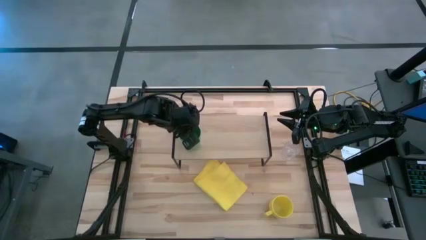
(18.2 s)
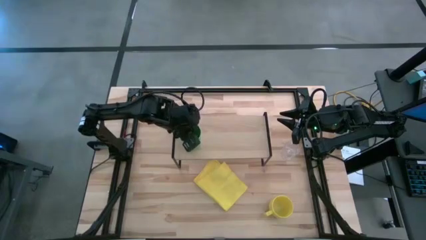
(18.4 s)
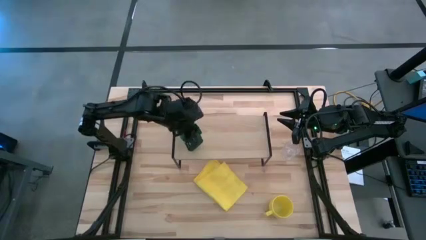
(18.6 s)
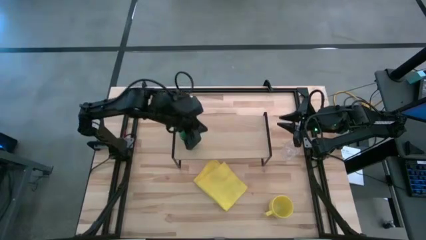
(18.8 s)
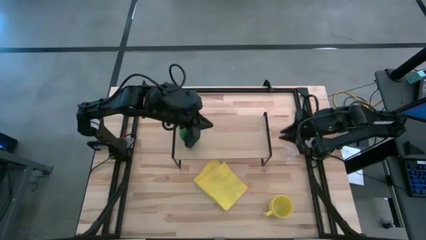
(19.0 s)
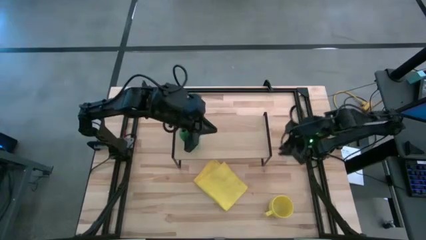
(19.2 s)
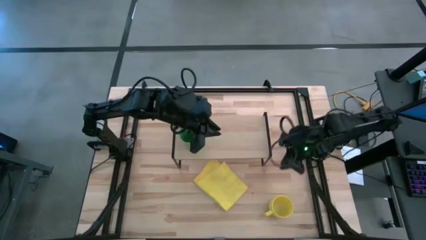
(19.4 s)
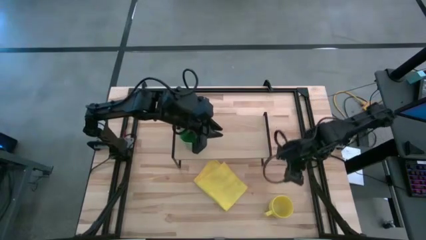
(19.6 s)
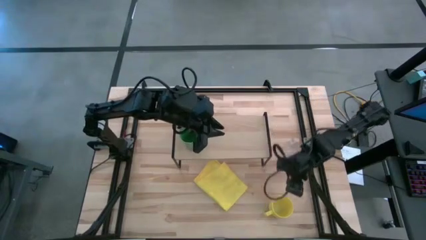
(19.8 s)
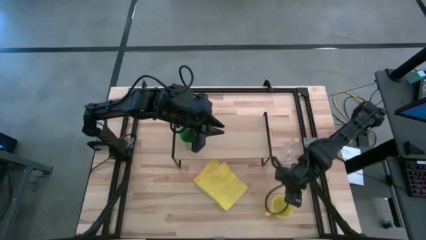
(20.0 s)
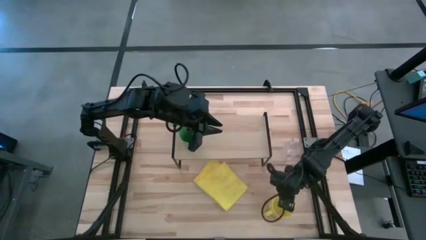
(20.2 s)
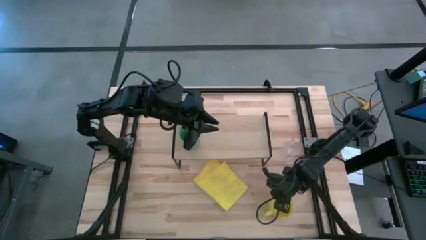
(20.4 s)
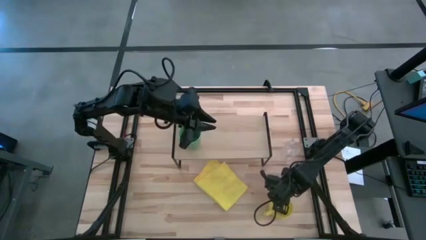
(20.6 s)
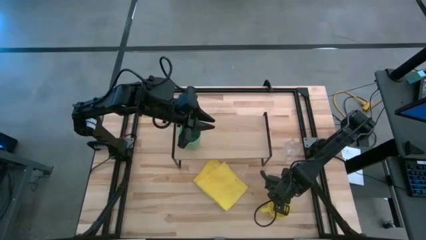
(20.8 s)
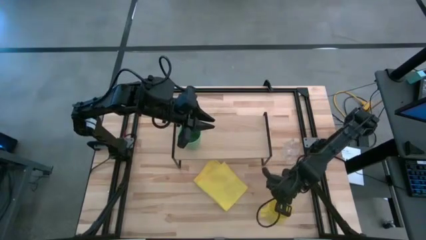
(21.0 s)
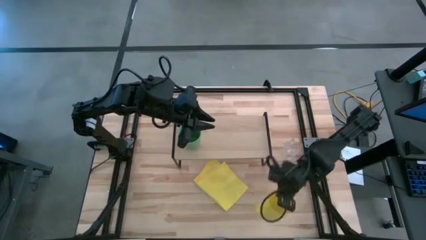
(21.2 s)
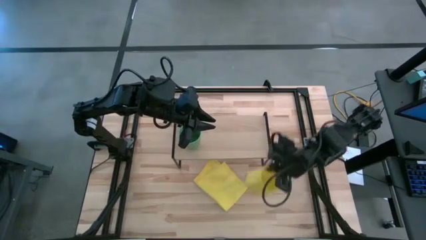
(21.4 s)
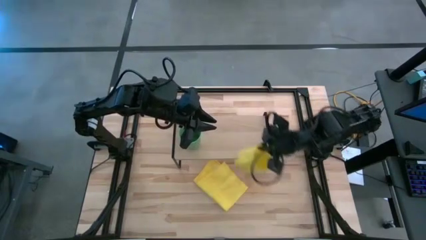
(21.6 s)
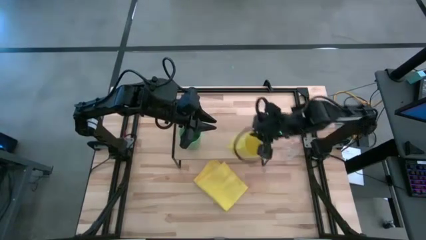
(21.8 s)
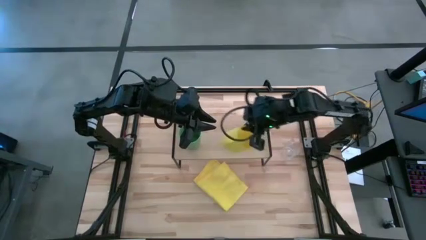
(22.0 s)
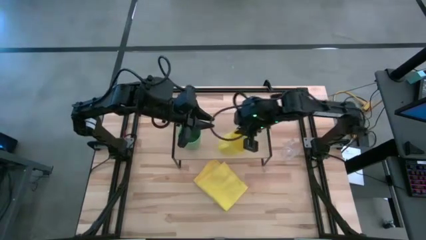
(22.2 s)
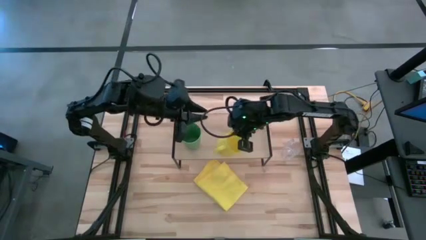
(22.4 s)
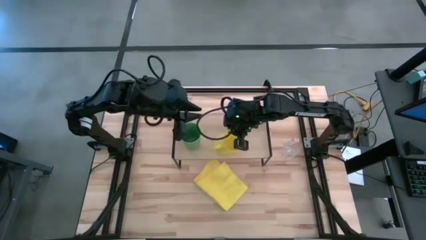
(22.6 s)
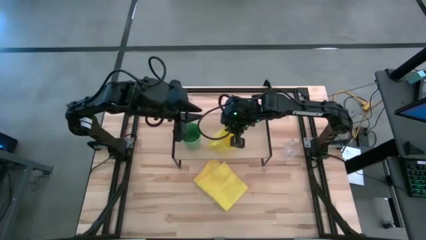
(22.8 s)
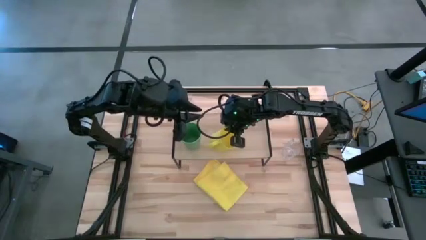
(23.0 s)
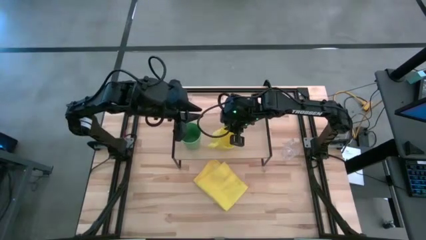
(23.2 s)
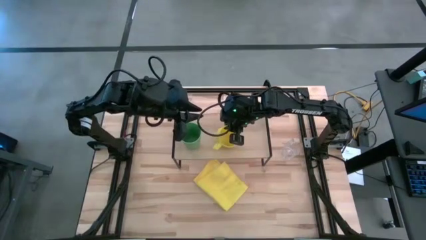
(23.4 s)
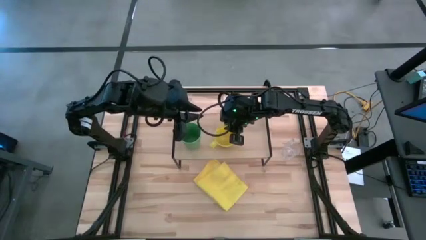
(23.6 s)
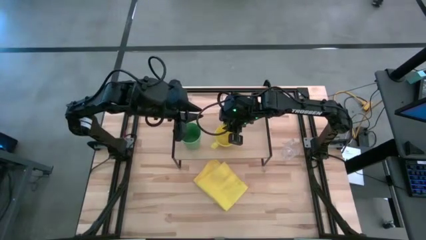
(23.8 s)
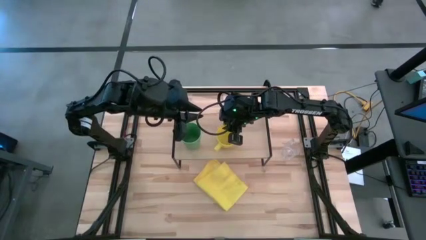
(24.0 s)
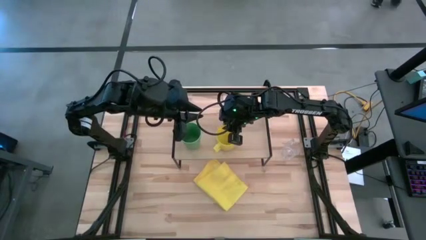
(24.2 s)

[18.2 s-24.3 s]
Task: Stack small to large cups/mugs on shelf
Put the yellow mug on the shelf

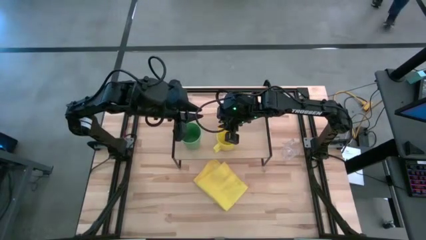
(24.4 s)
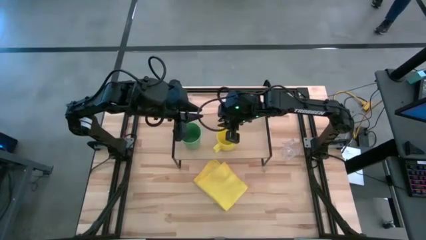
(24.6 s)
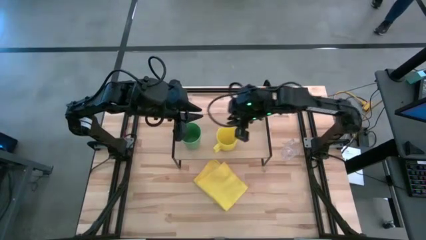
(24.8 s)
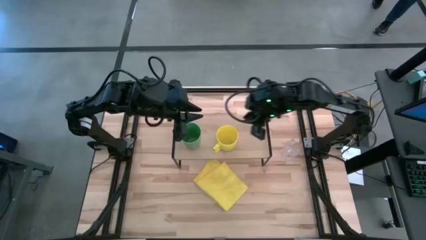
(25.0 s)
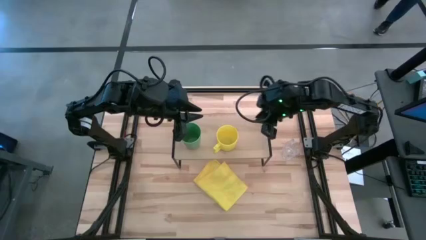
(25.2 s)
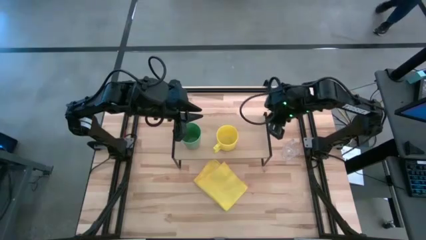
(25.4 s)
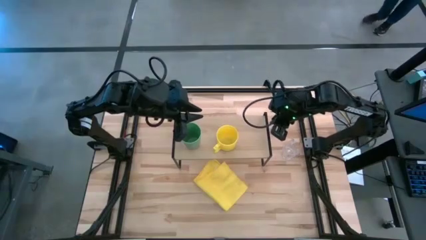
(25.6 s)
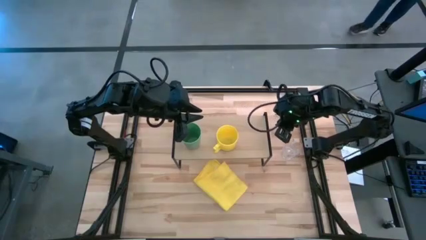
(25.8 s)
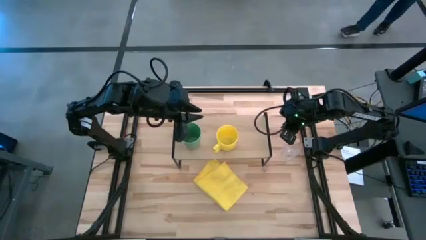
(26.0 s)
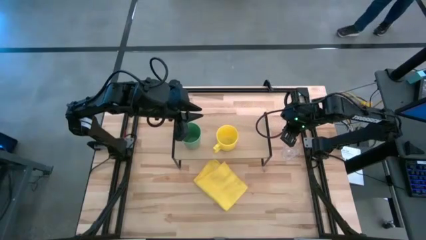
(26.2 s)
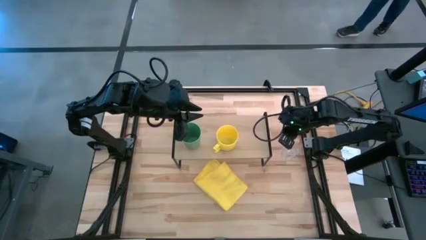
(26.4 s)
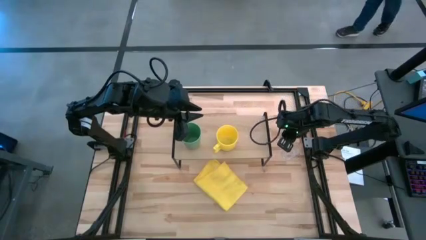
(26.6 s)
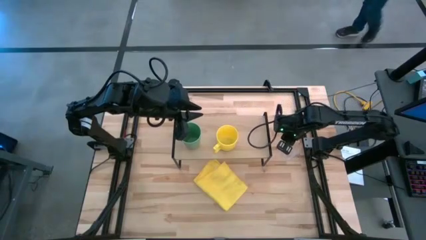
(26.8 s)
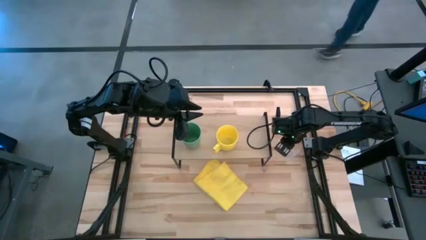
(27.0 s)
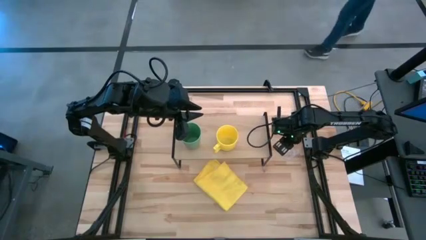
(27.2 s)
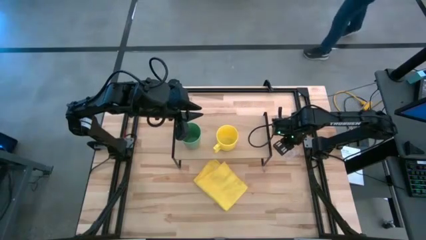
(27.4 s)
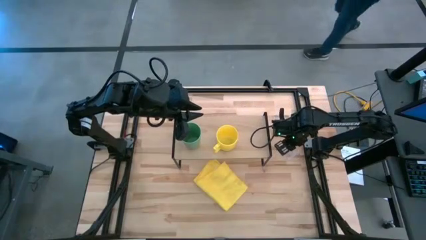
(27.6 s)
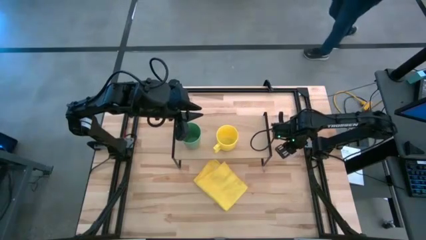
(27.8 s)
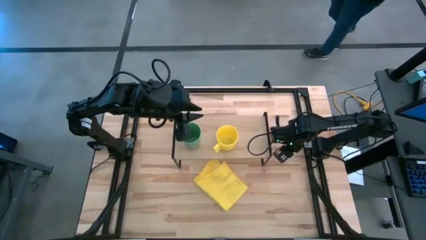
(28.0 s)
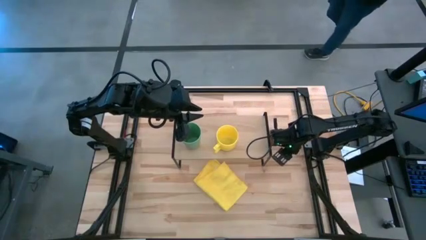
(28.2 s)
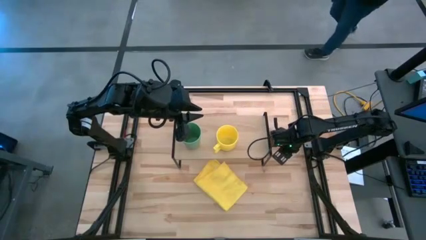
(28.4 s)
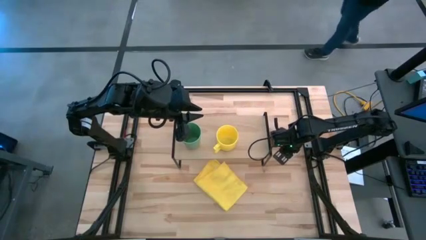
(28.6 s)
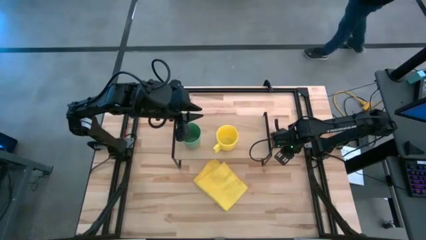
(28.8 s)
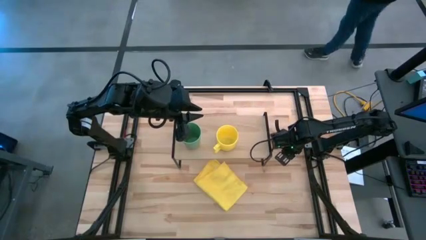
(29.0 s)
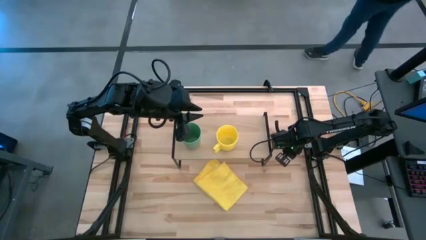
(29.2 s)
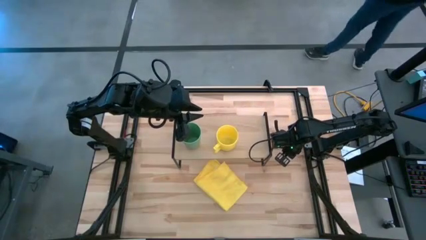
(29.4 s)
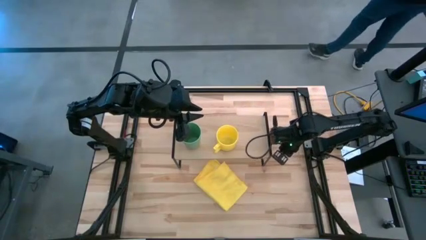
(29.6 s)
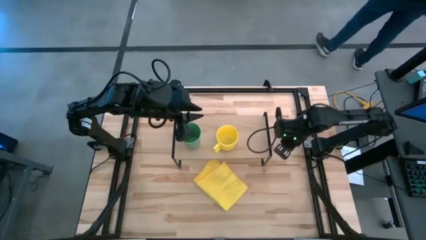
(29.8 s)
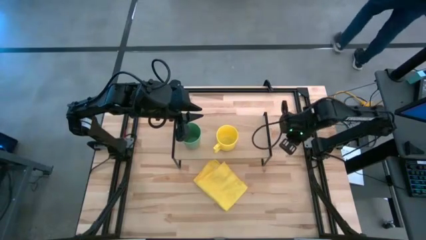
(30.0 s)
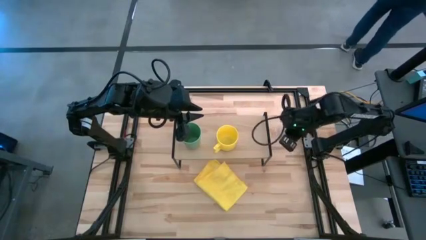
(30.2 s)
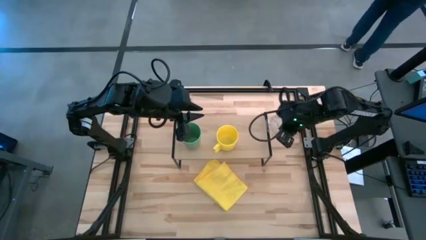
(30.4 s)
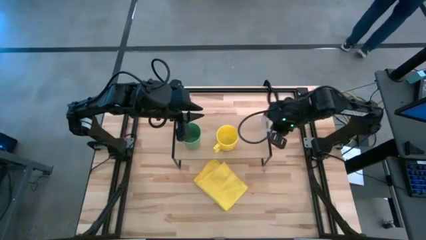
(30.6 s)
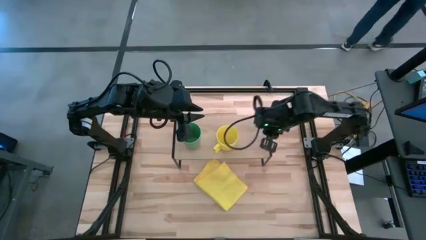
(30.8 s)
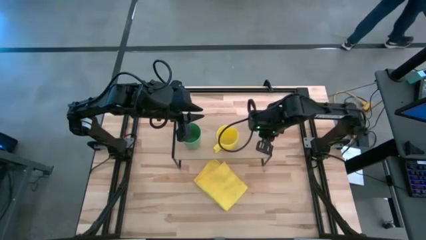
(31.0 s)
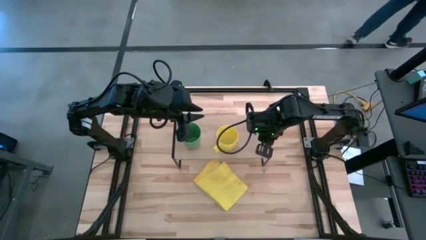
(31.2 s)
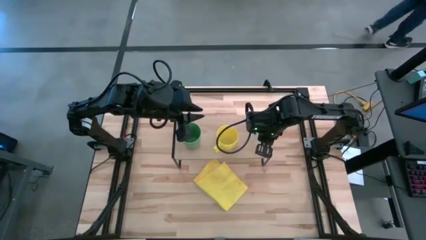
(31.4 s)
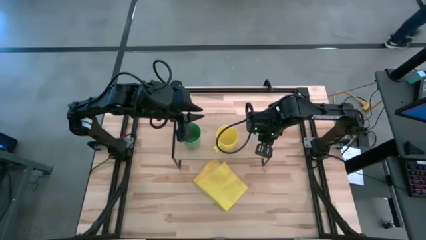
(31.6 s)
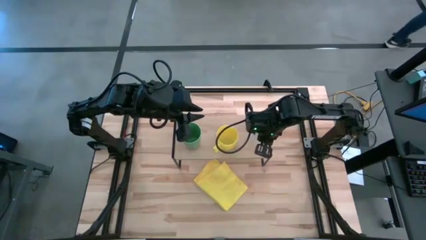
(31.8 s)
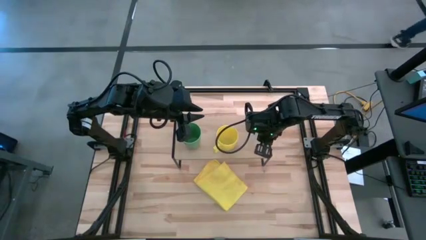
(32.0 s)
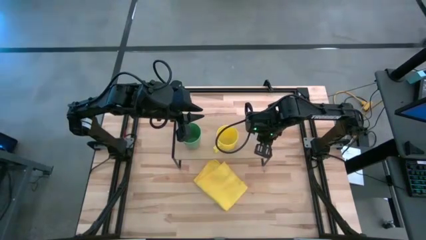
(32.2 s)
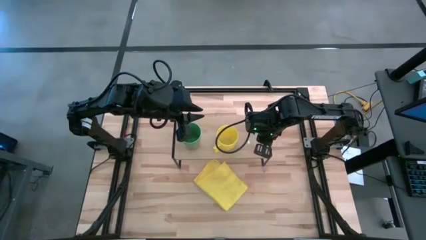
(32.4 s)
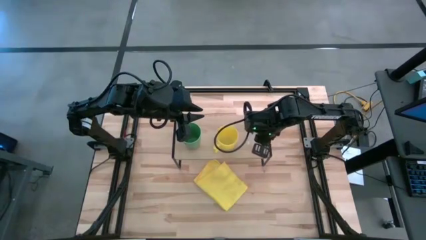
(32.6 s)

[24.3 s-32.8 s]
Put the transparent mug on the shelf

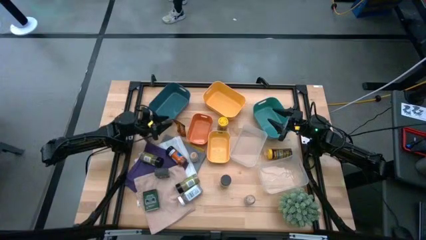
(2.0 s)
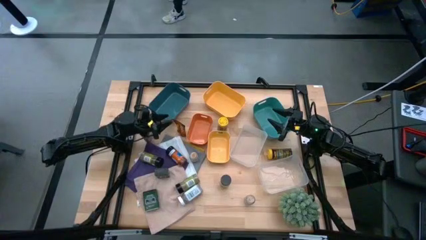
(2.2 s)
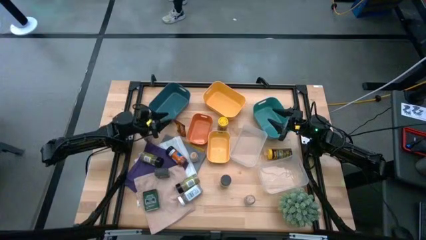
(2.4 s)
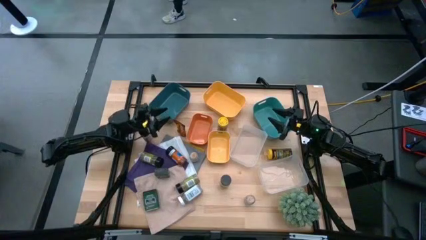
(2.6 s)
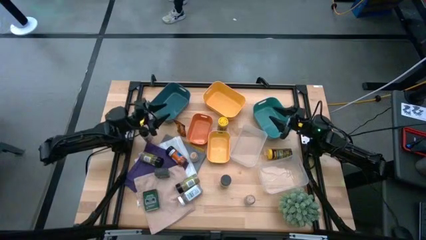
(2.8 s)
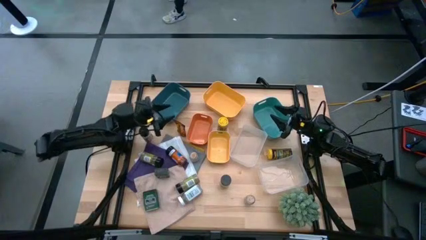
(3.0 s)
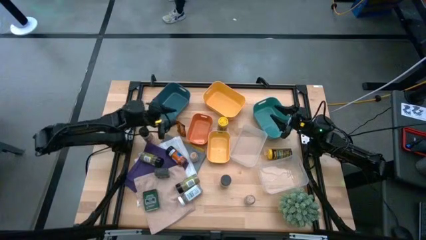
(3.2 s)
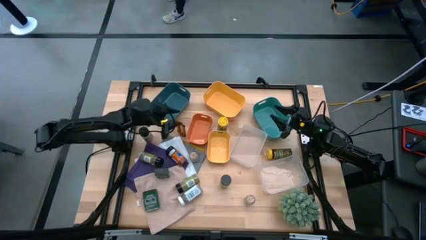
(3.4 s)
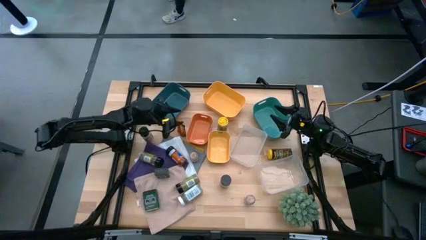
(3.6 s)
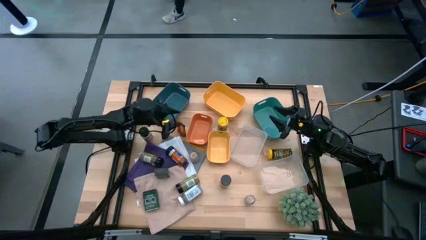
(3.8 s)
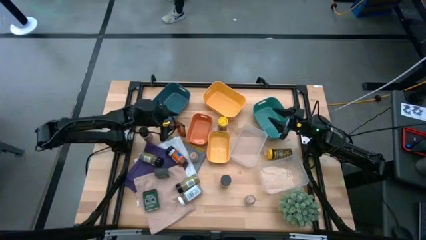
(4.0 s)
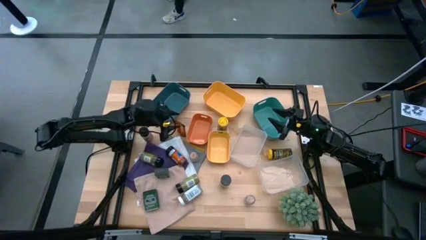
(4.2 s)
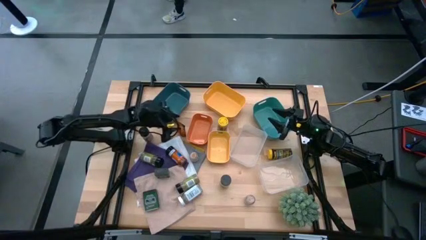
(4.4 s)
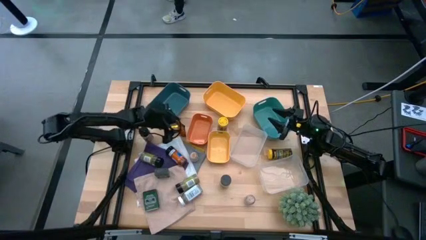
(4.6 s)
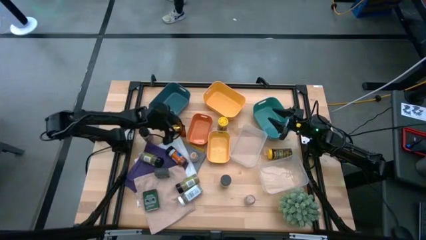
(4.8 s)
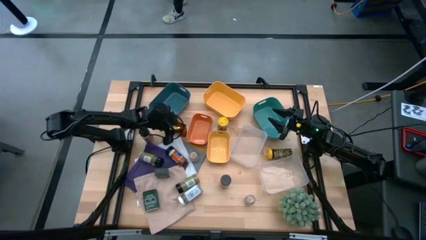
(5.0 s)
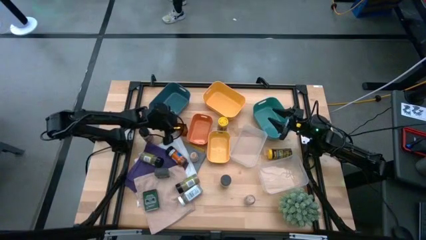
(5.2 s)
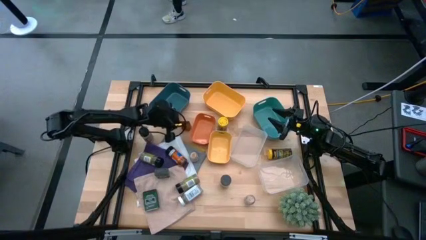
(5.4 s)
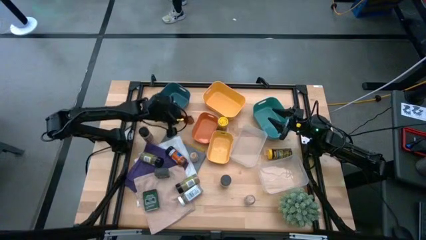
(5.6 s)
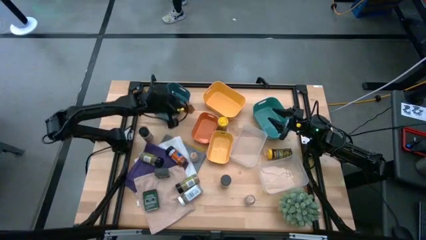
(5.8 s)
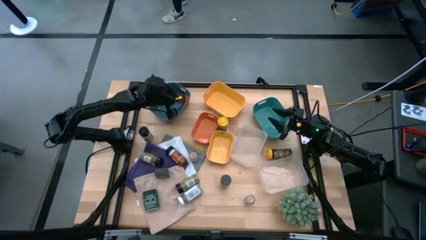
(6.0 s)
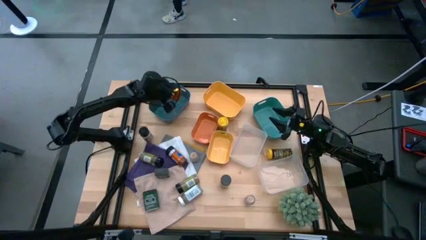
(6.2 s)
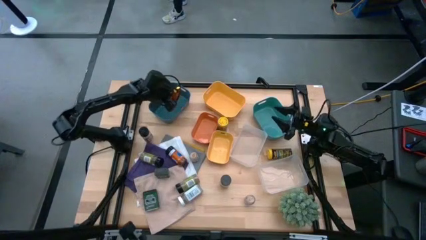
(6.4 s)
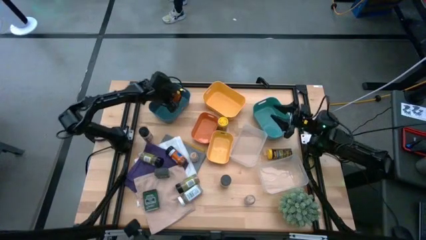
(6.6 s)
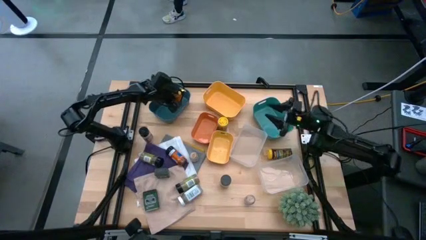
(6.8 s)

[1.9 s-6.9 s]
Task: Sort spices by type
Put the orange seasoning bag into the dark blue bin
